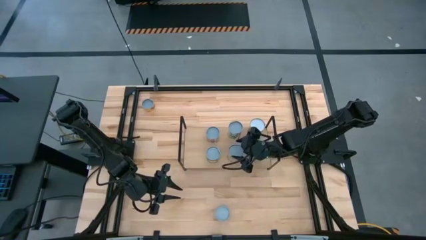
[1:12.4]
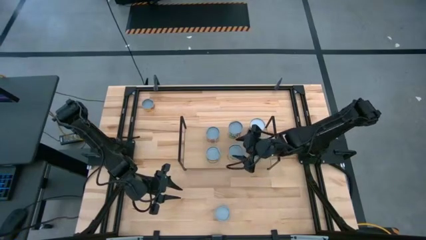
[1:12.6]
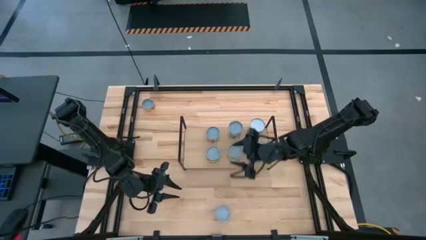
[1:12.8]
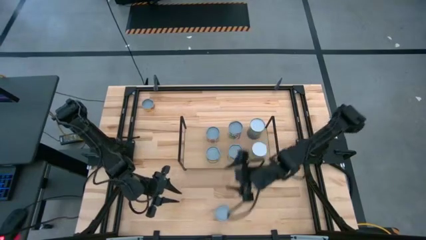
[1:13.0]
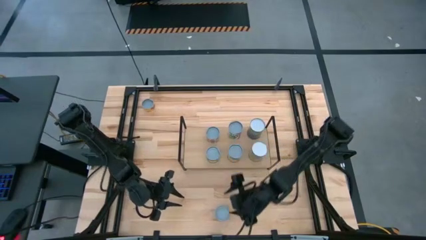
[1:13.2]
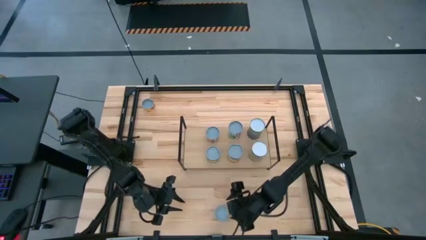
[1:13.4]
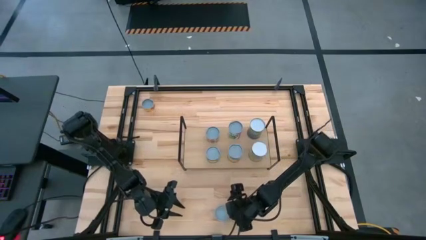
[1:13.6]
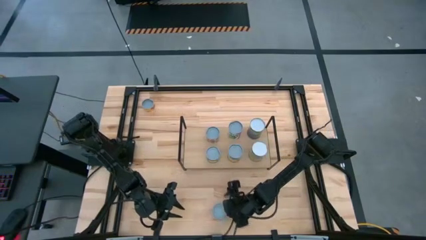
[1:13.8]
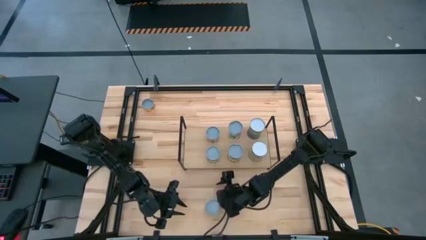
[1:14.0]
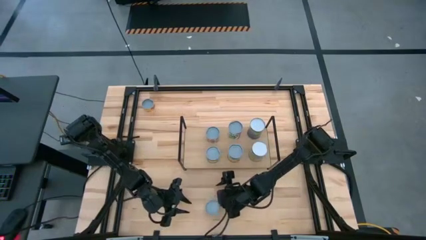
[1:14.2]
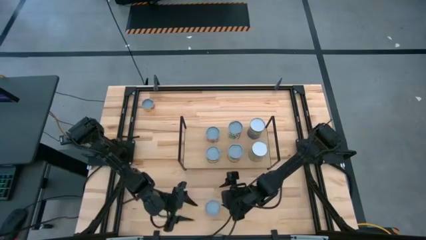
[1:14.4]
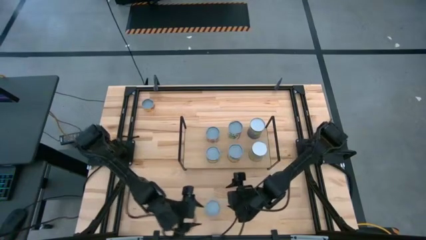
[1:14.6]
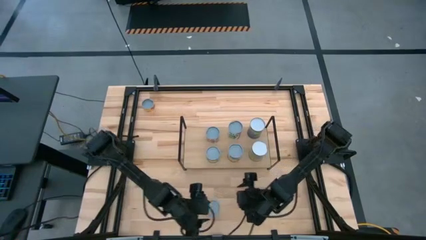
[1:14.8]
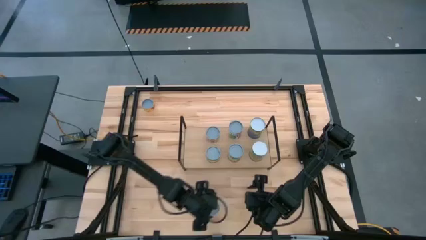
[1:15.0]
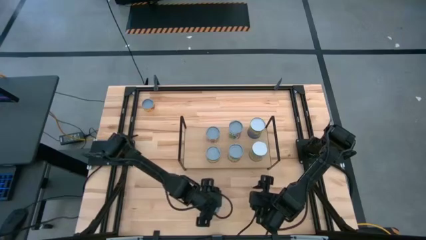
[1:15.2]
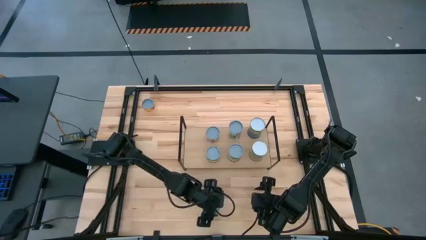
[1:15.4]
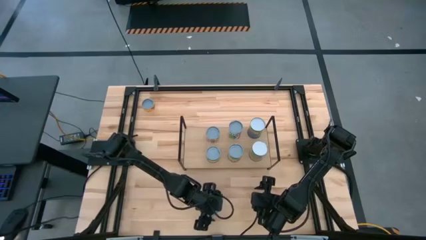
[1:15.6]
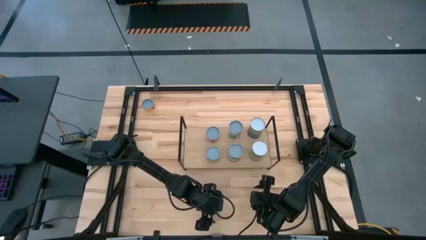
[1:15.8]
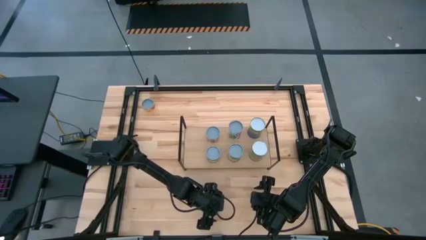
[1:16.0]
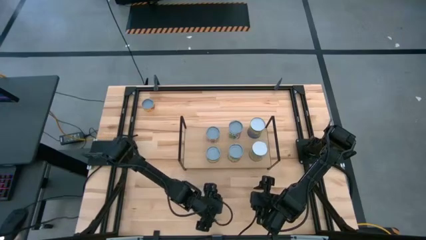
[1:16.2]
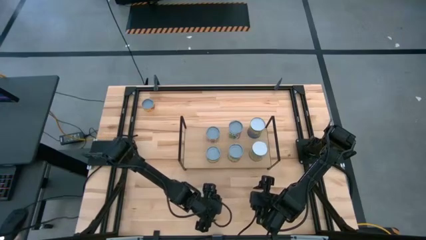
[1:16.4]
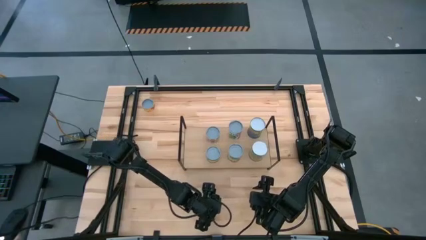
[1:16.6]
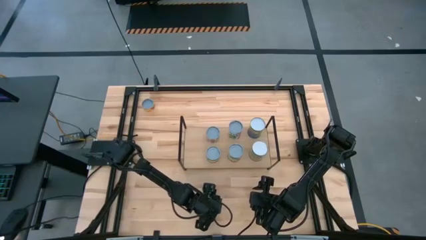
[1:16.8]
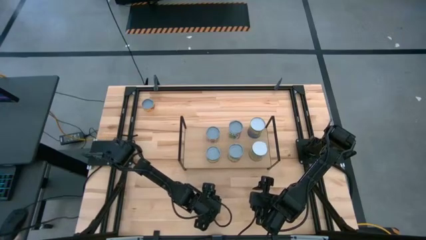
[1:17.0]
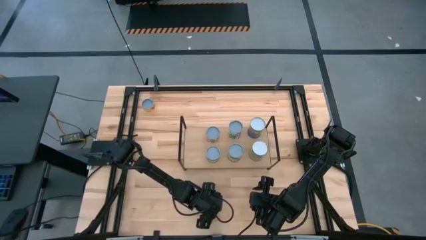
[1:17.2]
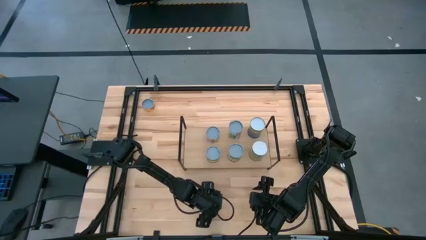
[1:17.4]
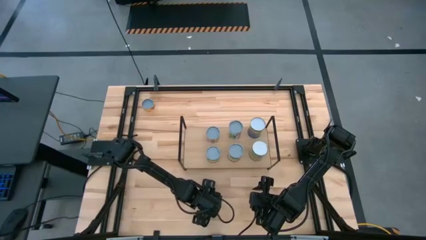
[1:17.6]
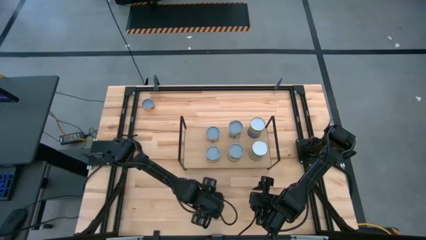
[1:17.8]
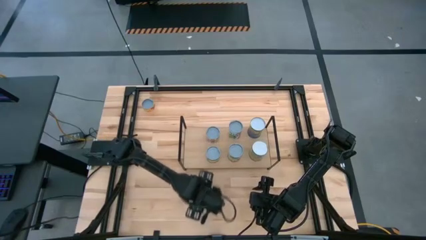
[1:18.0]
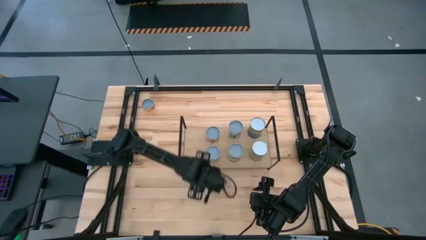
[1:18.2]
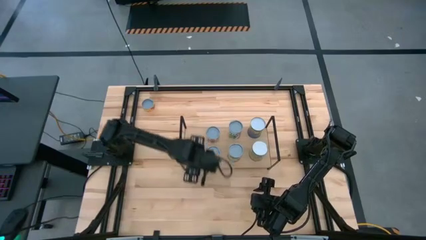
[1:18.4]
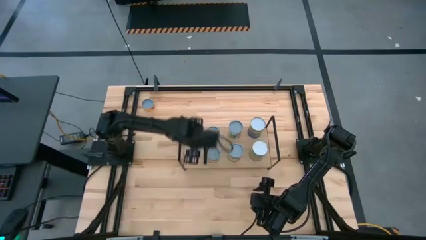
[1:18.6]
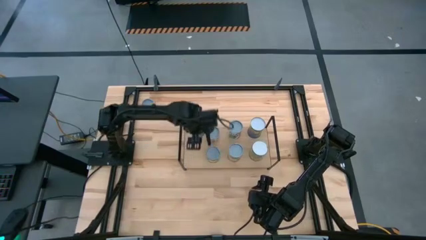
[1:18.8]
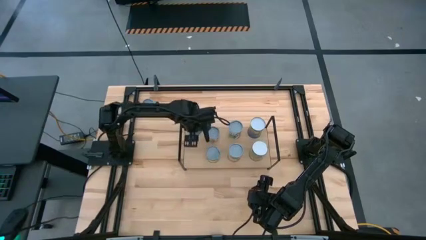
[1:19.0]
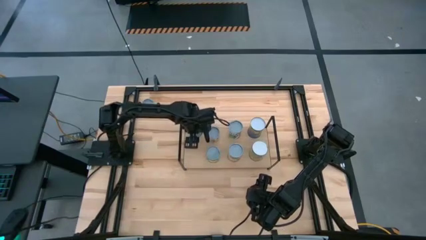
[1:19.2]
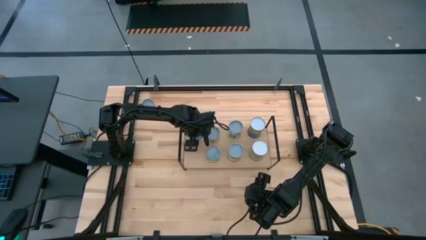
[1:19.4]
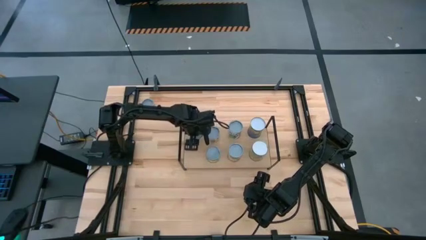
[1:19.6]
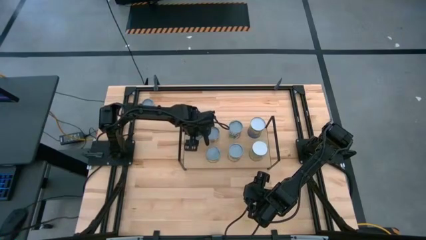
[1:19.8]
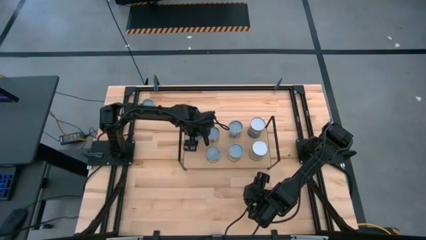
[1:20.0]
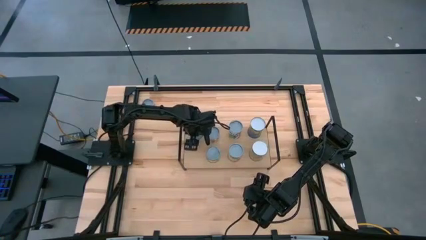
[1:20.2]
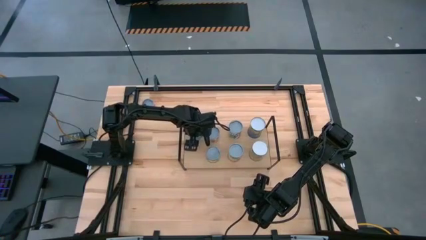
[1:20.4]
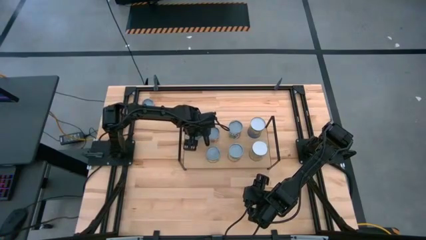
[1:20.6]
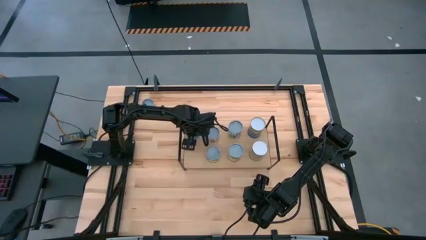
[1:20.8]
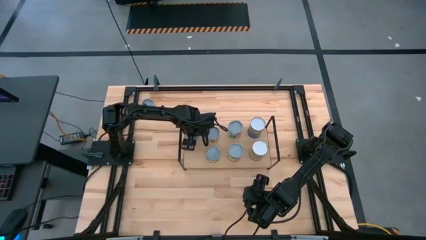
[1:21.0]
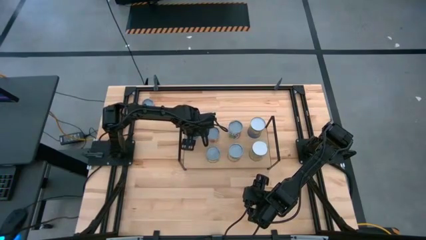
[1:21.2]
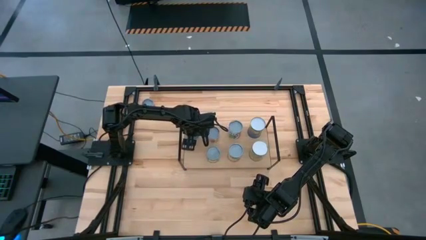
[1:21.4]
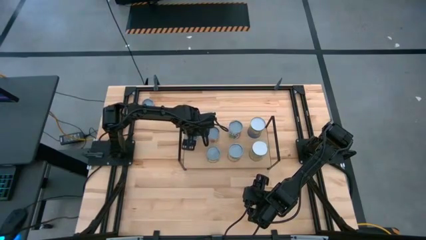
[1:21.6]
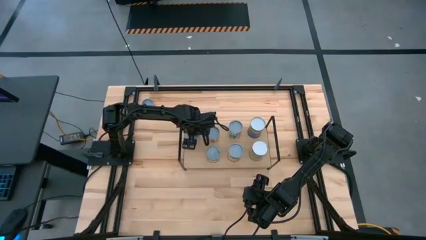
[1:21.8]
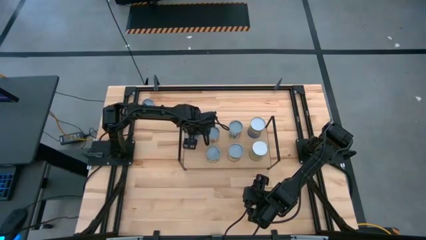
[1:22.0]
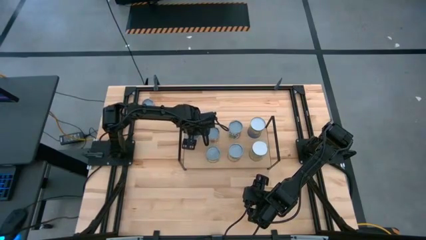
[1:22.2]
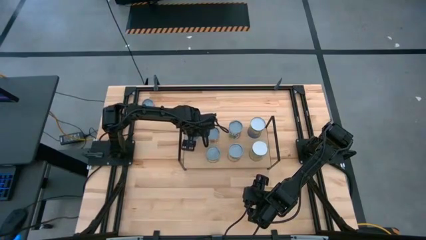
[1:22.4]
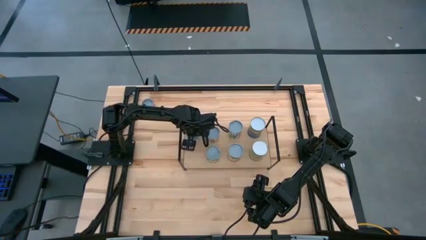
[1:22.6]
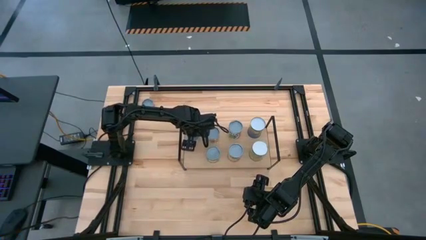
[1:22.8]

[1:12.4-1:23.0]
Task: Pick and place cans onto a shelf
Put the canned salmon on the shelf
